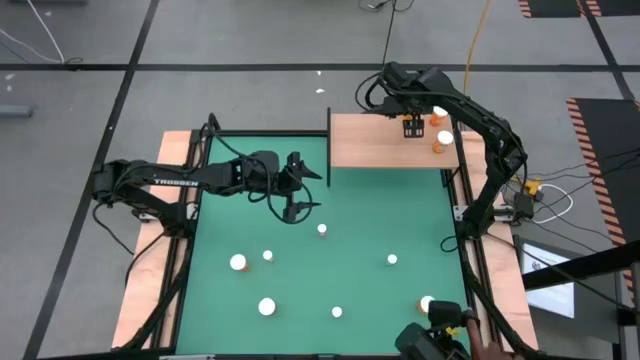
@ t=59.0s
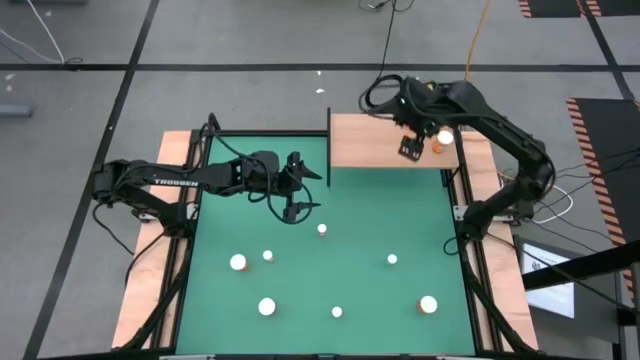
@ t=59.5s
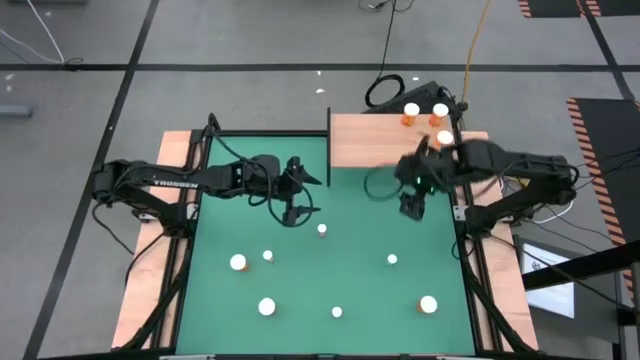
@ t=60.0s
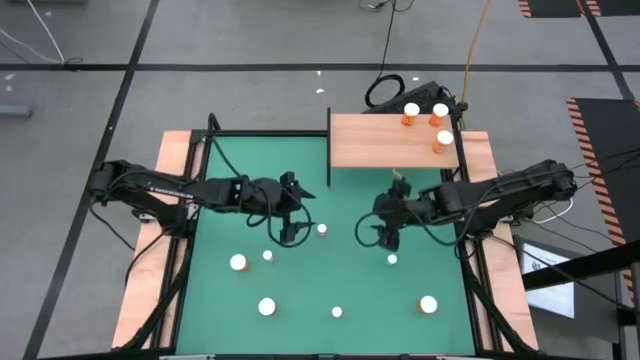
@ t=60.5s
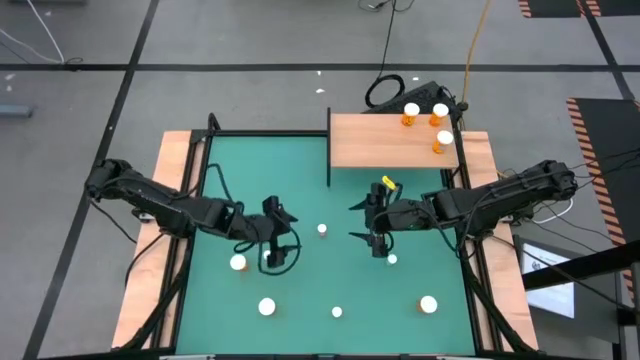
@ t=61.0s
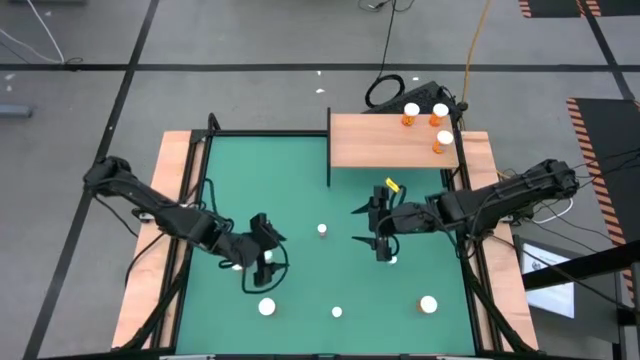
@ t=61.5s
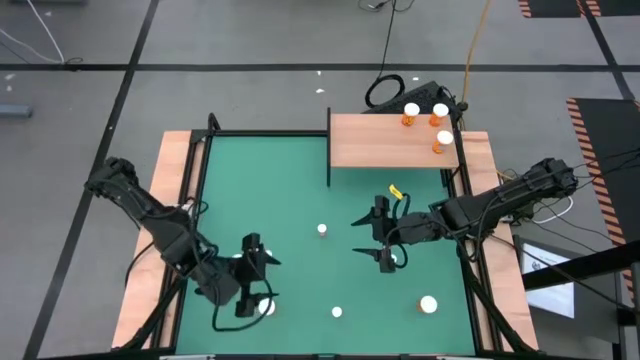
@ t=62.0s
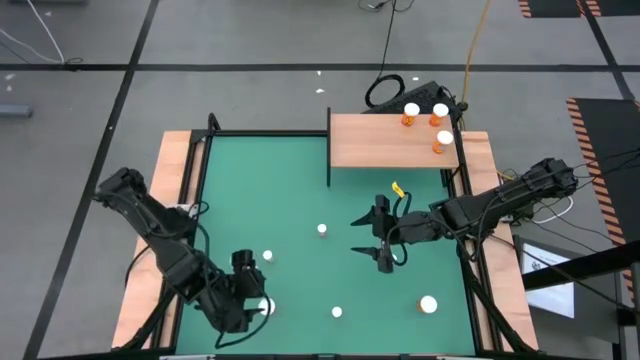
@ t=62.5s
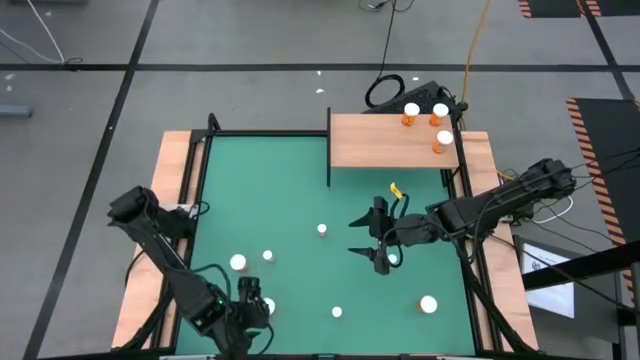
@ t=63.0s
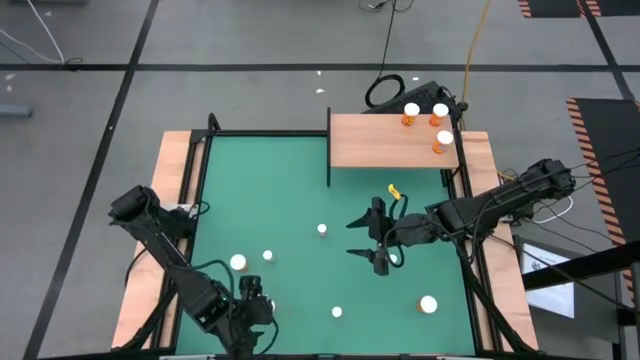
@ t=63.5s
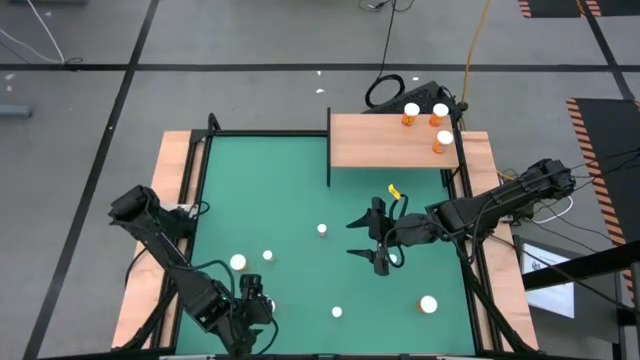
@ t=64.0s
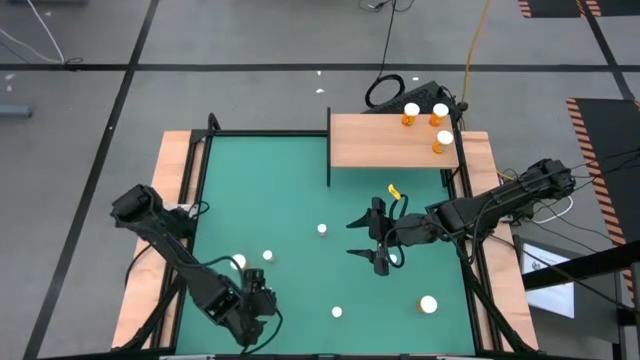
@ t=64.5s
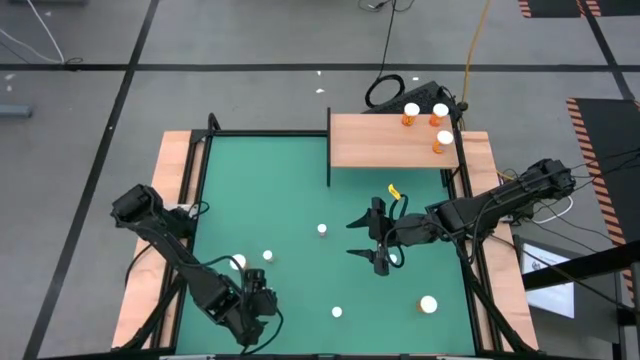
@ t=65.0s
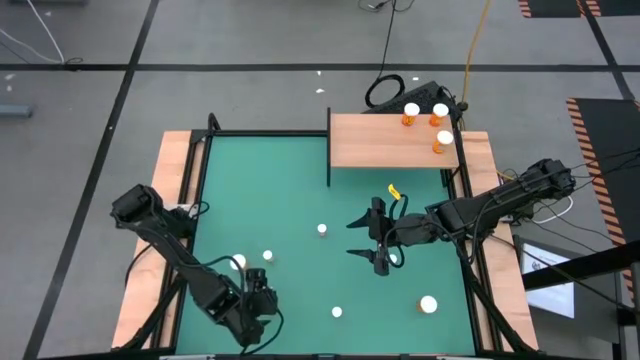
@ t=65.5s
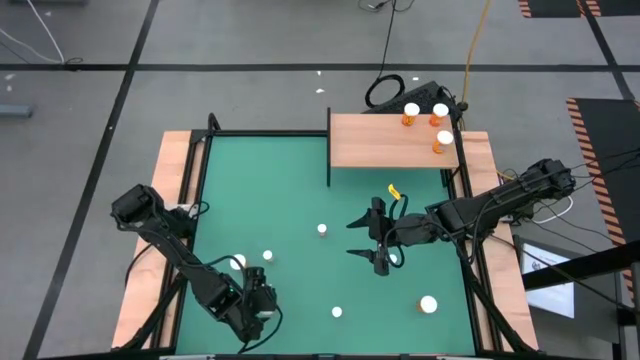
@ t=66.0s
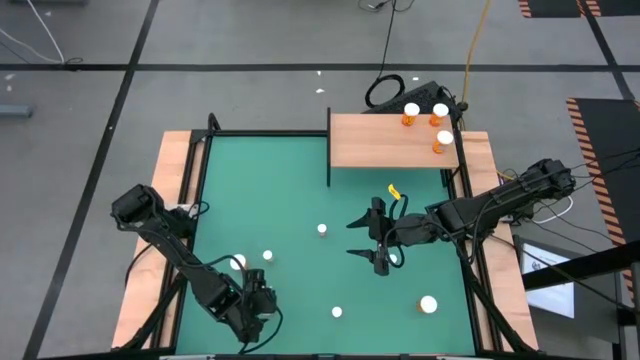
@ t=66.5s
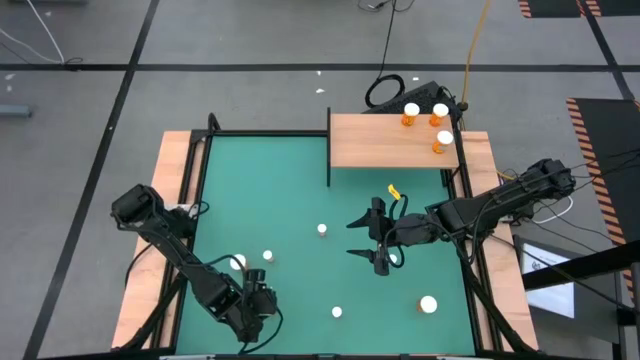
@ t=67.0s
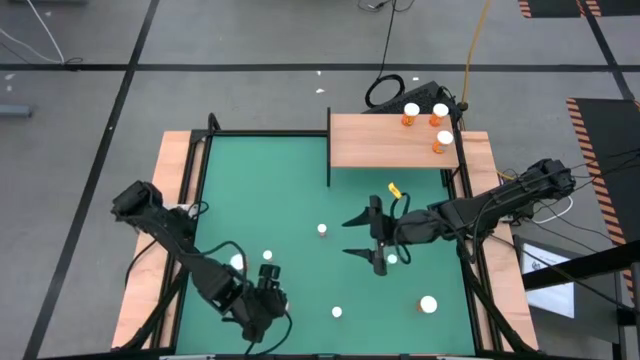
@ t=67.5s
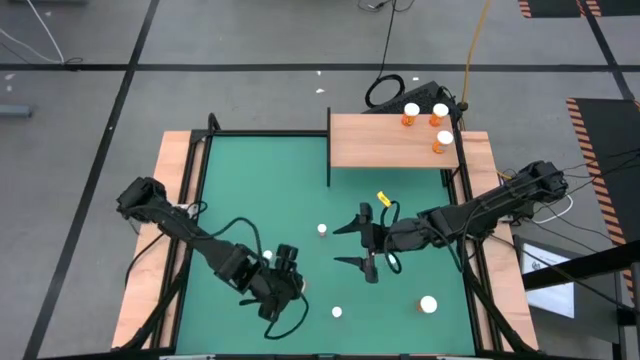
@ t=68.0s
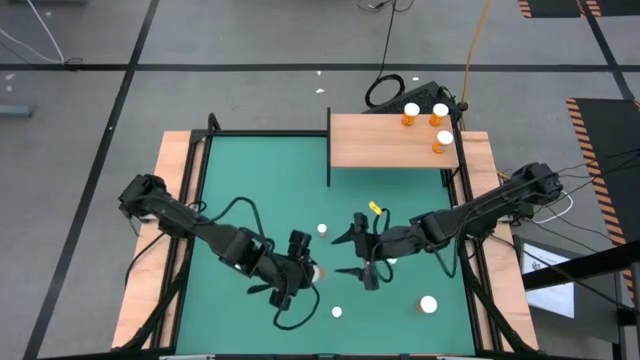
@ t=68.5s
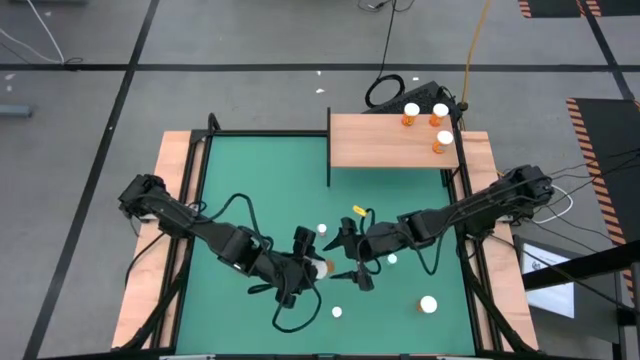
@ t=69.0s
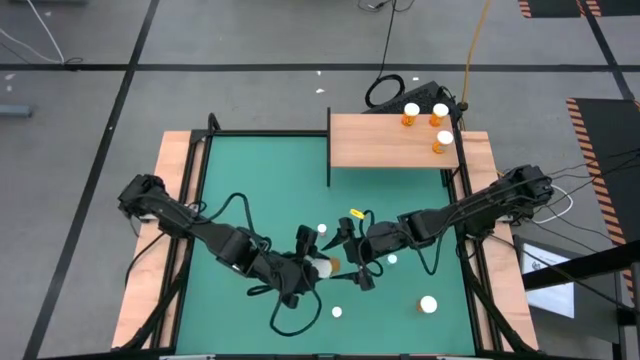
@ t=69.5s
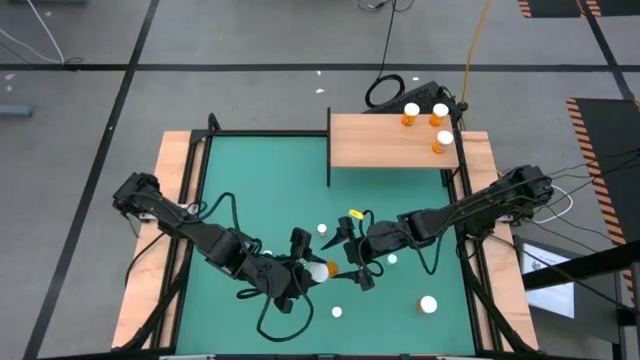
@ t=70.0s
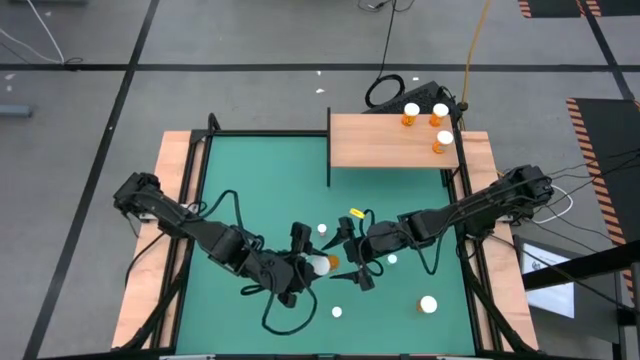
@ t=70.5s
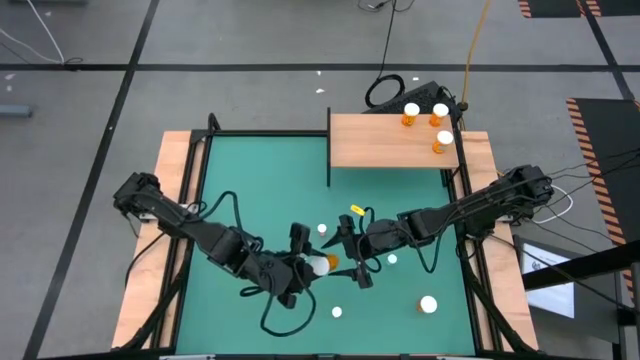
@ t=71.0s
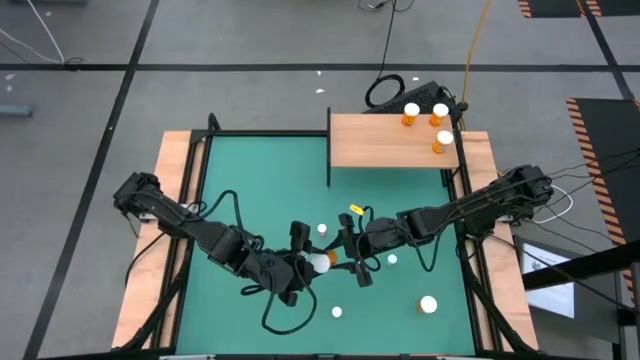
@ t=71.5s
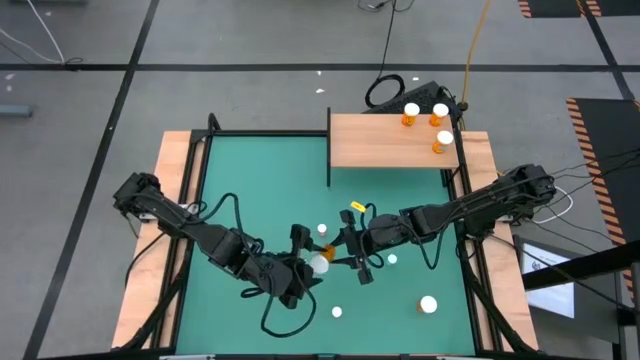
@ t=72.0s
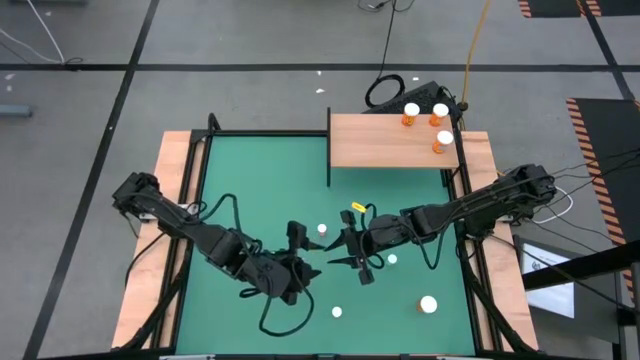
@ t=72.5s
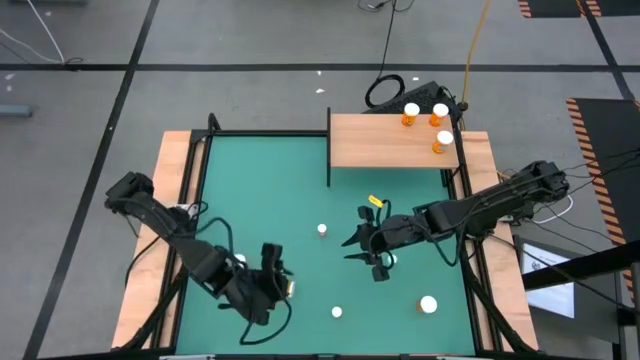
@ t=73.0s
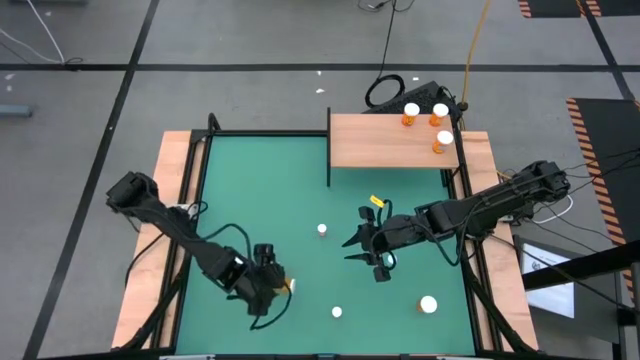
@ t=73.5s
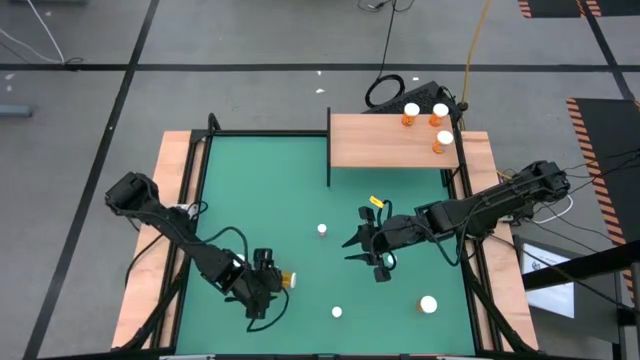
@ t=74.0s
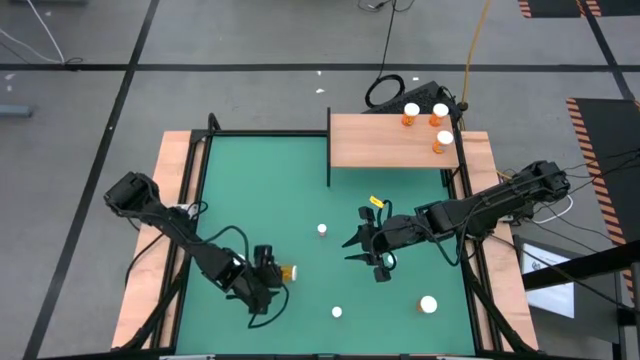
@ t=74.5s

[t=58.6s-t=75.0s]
Task: Pick and place medicine bottles onto shelf by color
Put the orange pill bottle on the shelf

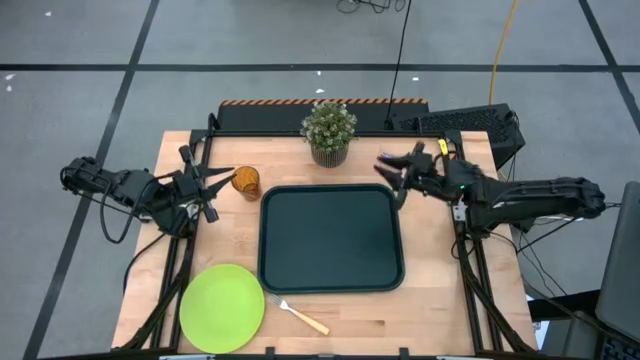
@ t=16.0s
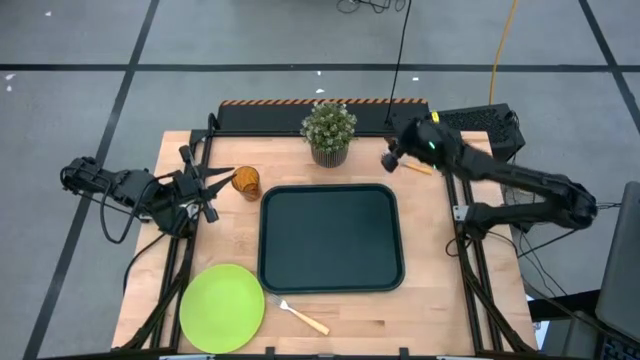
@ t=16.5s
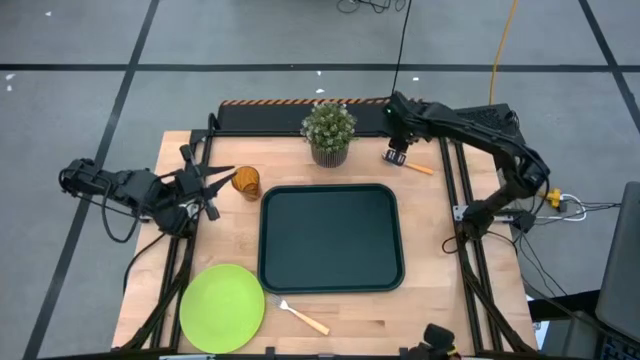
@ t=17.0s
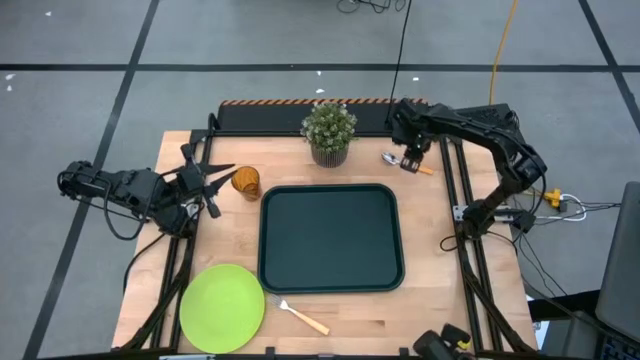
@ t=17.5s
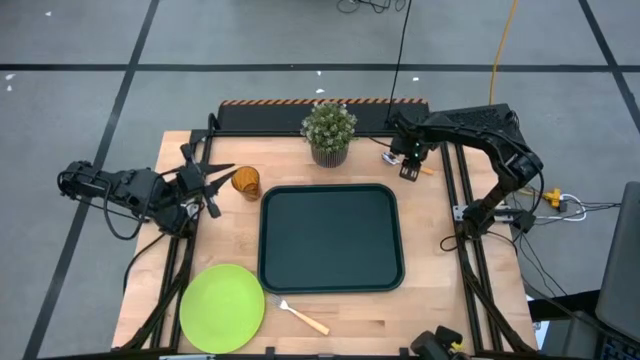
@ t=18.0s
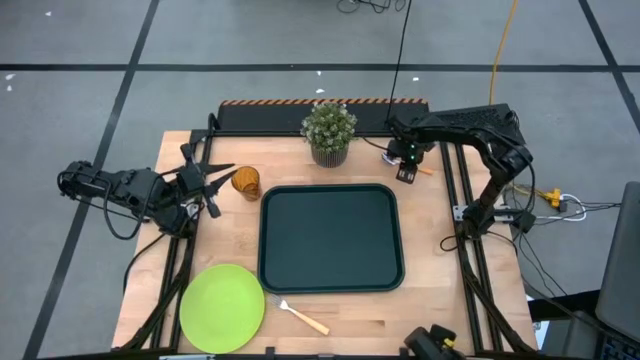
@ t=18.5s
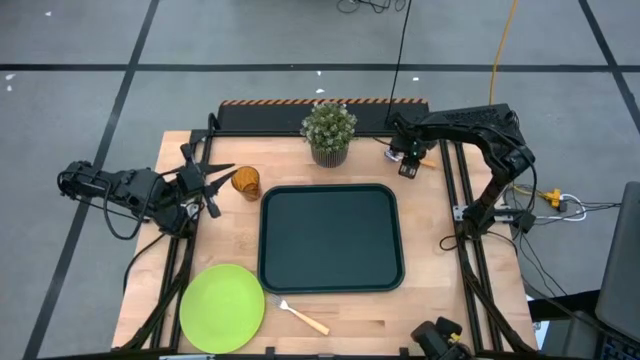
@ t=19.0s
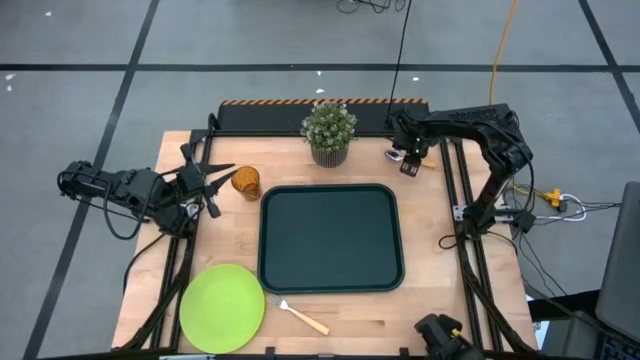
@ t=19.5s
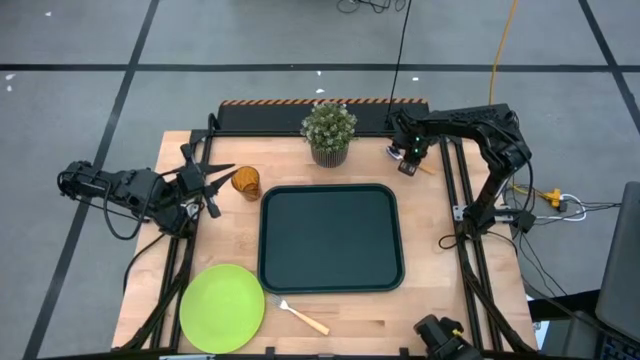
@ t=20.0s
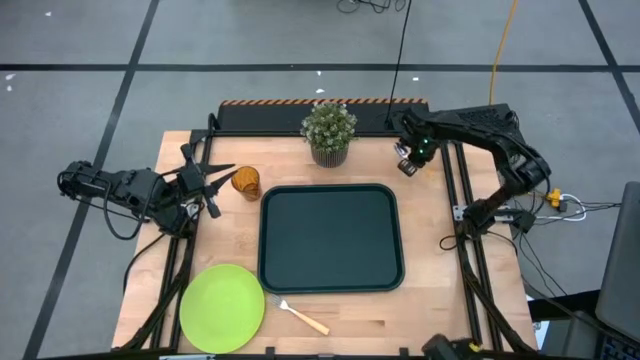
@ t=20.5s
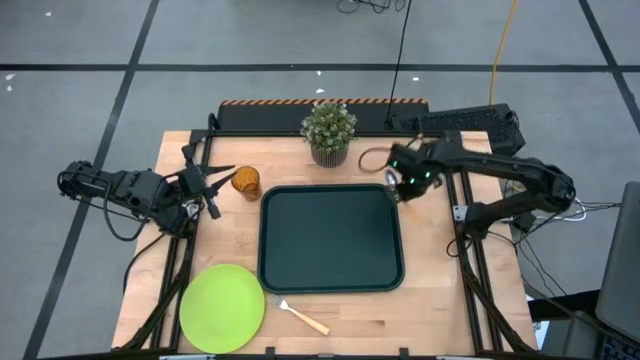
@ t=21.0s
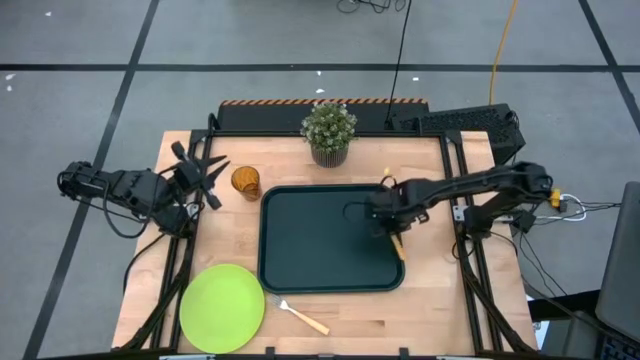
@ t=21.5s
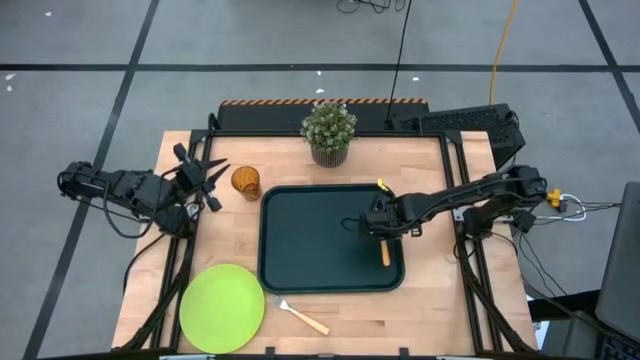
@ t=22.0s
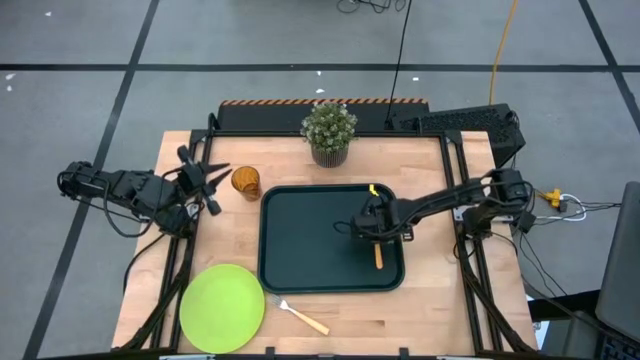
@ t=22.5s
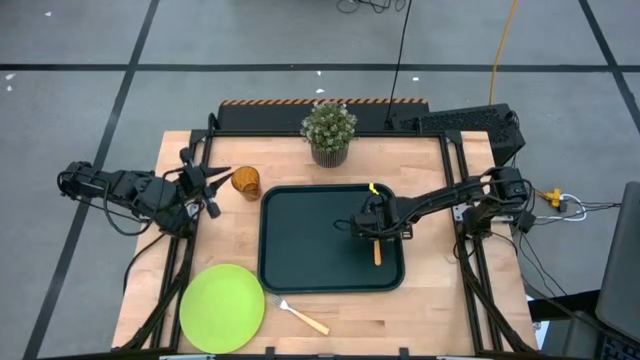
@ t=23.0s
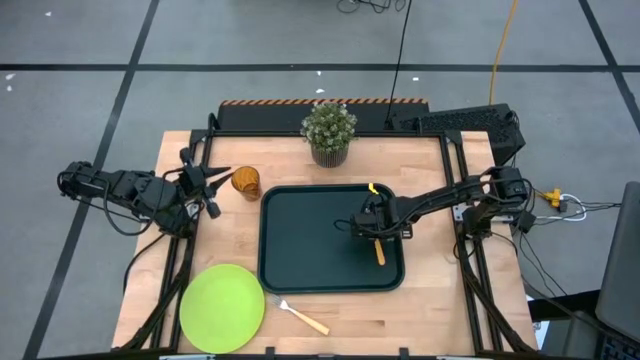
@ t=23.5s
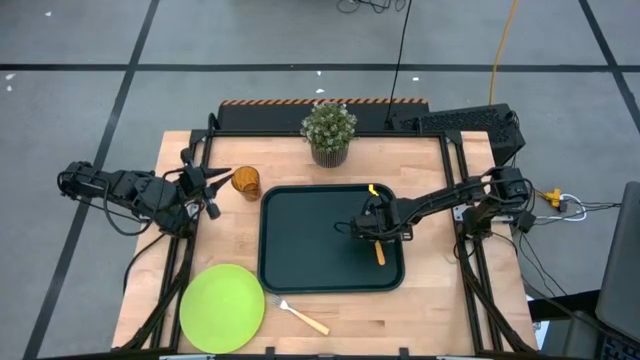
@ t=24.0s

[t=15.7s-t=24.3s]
Task: Pick and place plate/cup/fork/spoon on tray
Put the spoon on the right side on the serving tray
